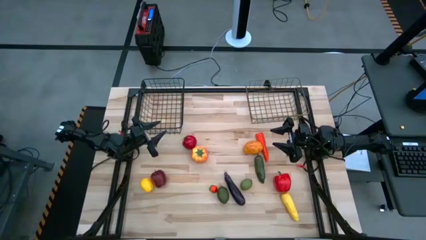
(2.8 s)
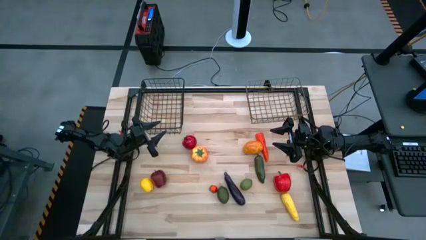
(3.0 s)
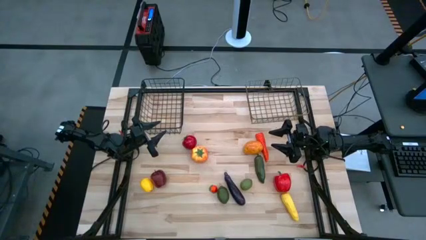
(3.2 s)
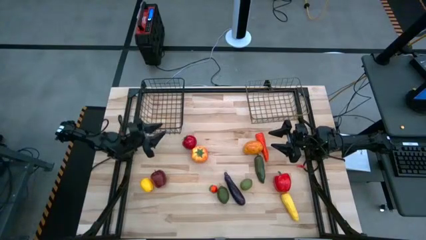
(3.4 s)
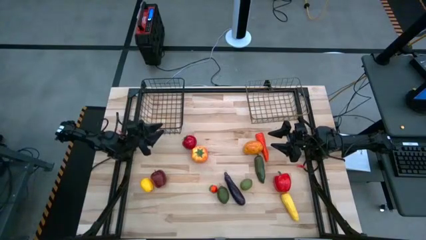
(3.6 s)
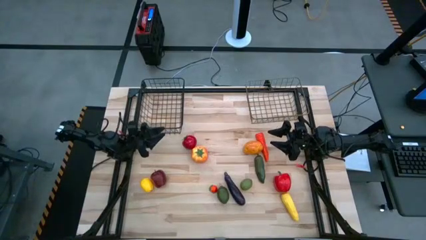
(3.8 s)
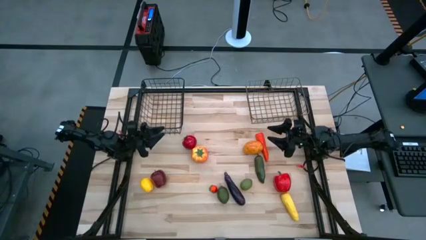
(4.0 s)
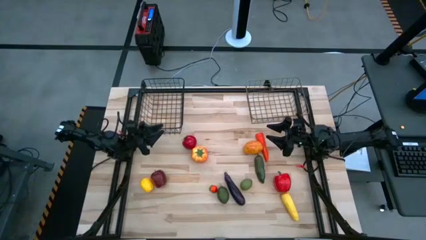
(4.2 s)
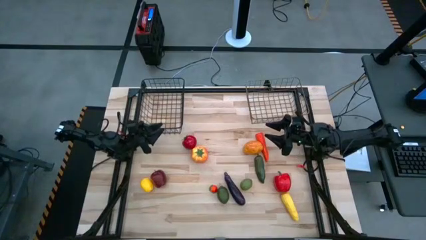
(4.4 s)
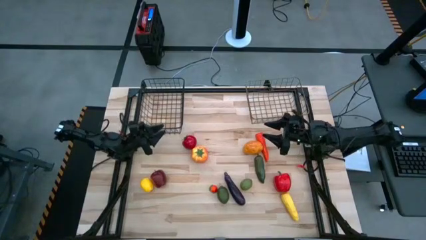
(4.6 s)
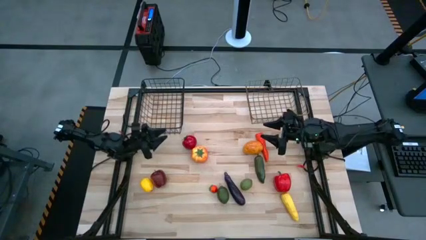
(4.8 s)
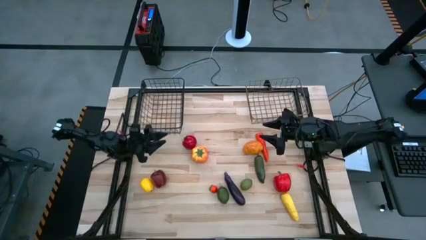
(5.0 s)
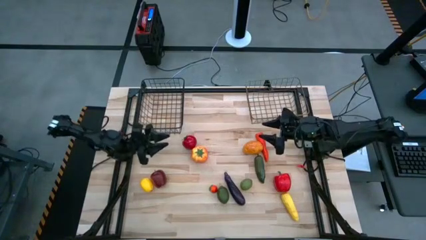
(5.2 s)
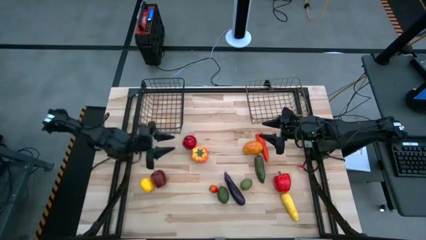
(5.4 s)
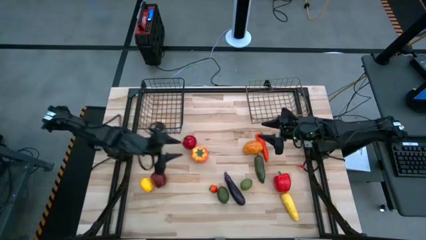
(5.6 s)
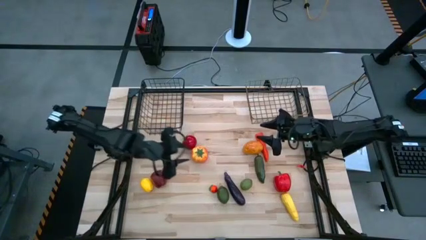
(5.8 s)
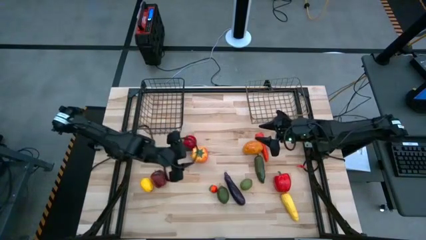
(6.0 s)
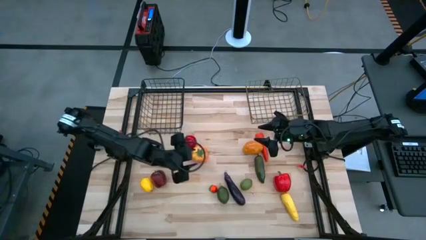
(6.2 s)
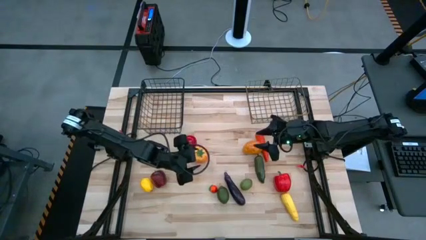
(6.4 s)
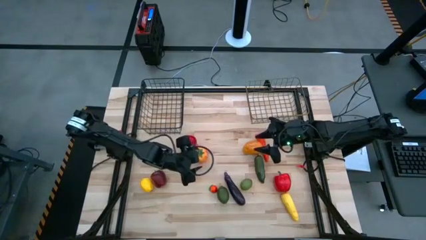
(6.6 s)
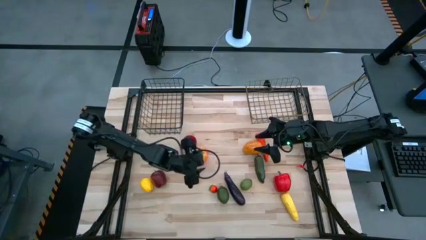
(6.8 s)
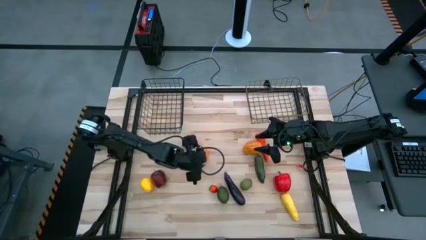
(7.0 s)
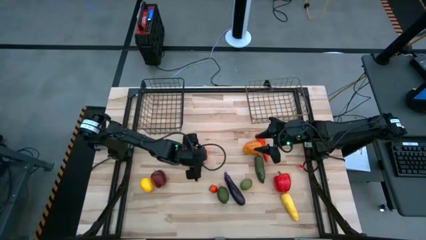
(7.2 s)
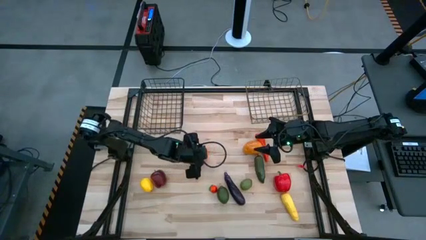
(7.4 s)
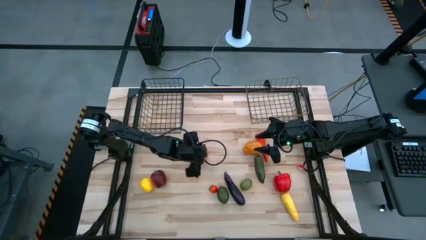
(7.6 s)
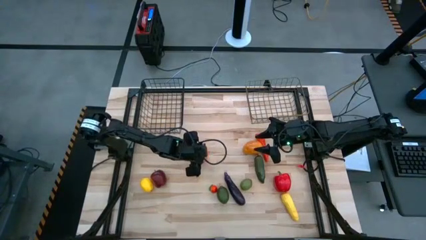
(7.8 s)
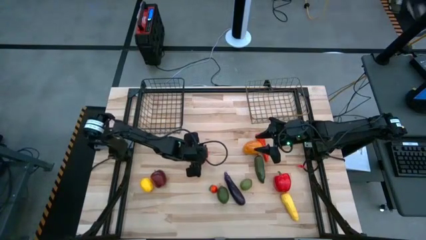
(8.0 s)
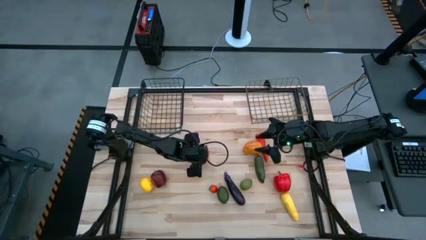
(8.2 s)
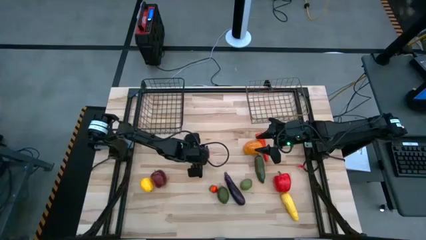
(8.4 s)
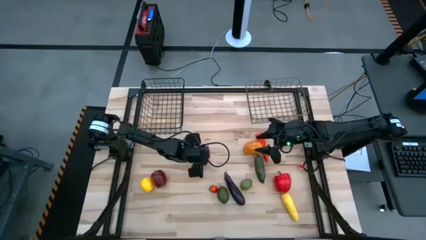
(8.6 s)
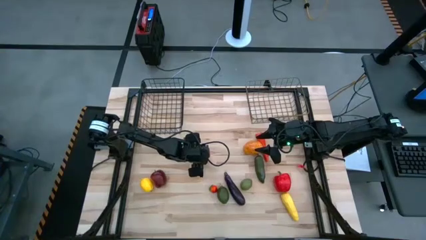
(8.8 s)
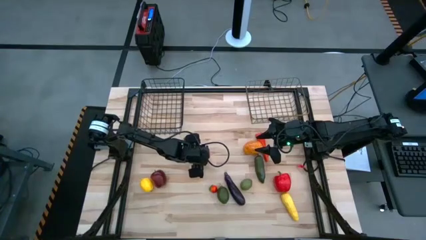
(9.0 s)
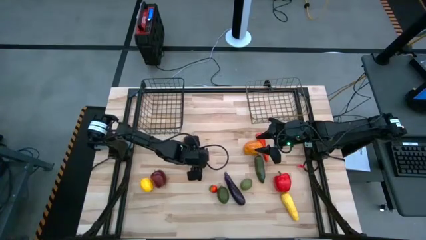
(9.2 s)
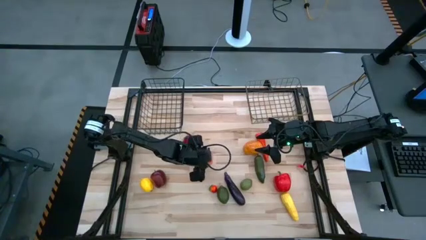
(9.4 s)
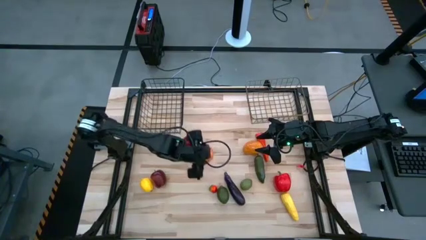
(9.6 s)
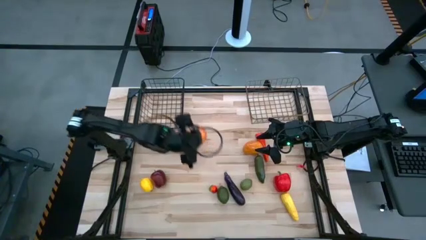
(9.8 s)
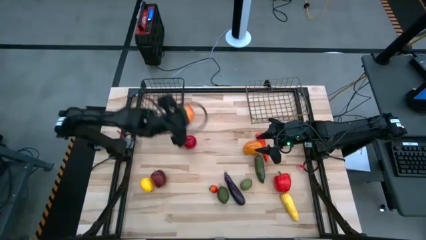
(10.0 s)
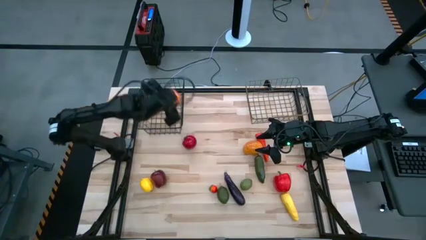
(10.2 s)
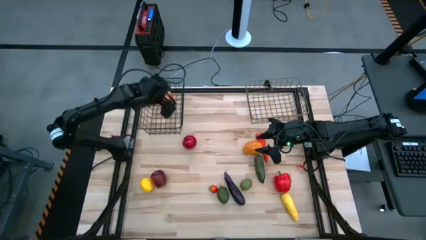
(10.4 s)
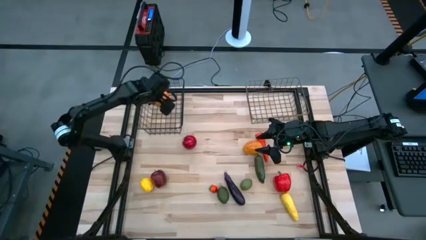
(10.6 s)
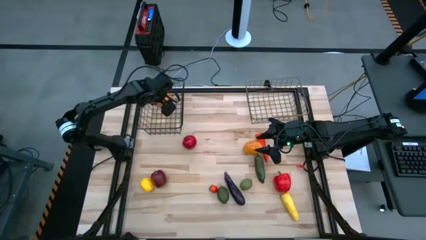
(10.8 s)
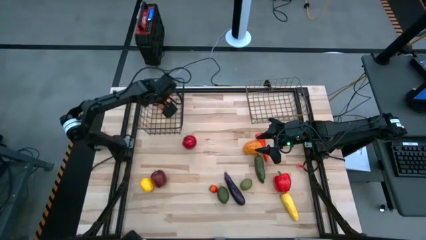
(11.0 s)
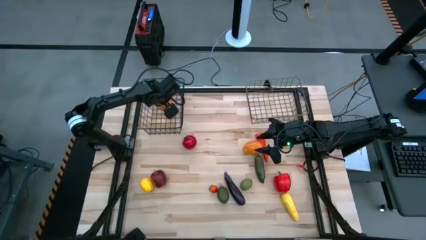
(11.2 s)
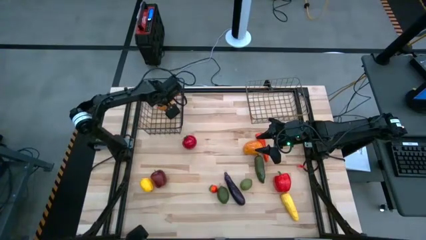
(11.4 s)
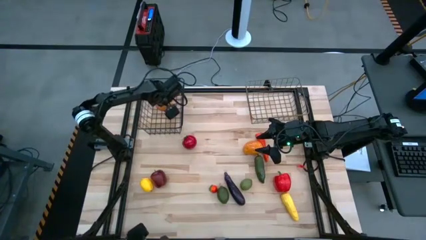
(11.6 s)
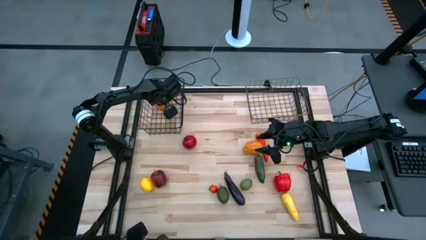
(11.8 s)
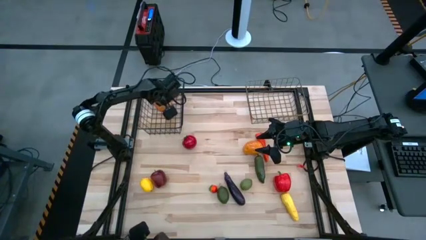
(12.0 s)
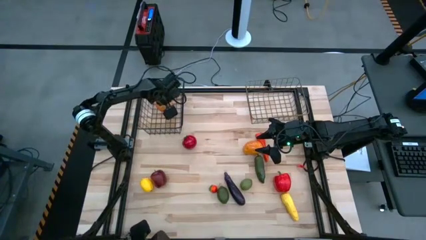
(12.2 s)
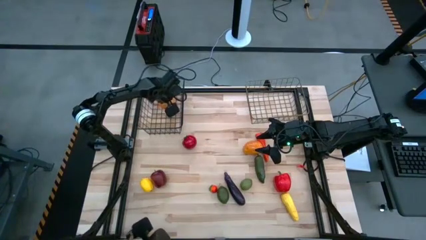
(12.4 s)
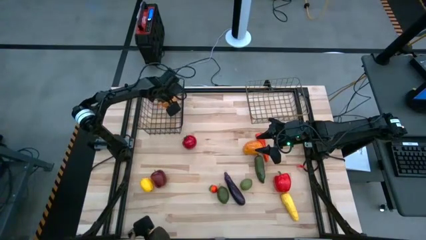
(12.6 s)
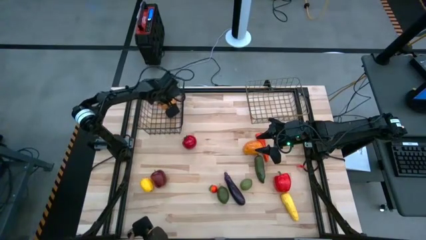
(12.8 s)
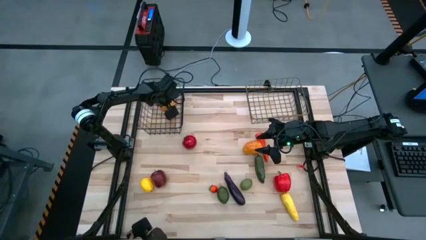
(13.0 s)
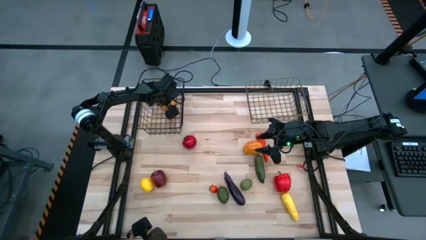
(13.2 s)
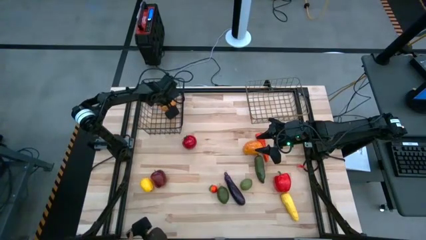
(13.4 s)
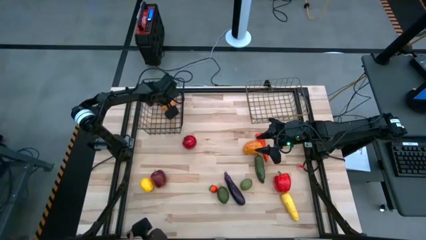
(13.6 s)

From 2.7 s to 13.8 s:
Task: Sort produce into baskets
Put the orange tomato into the left wire basket
